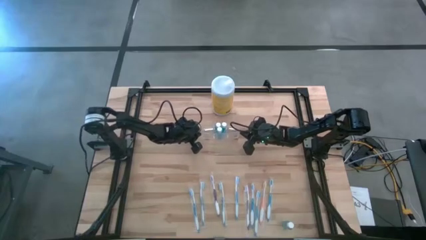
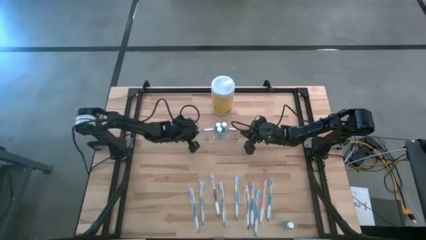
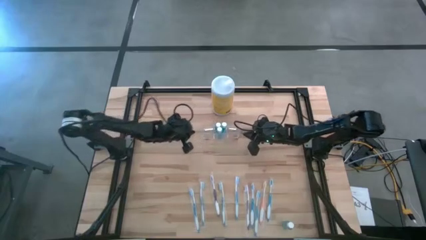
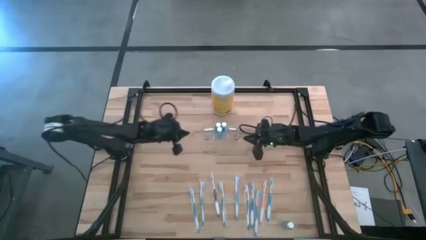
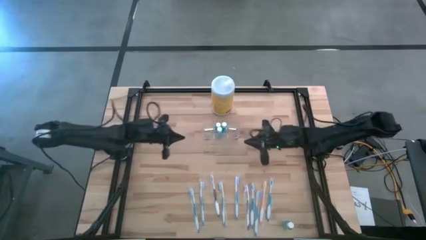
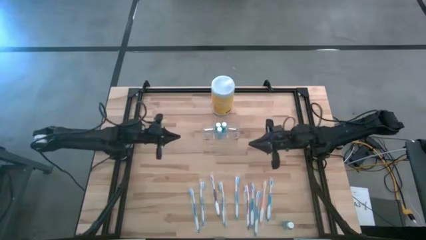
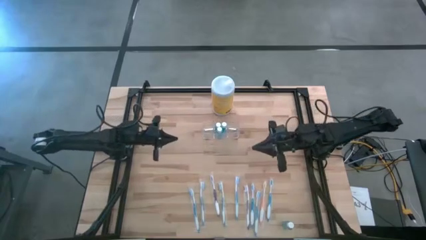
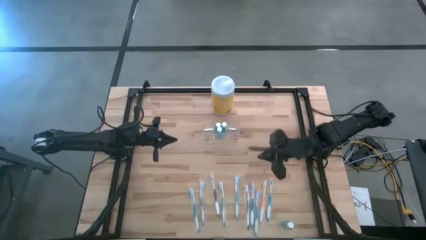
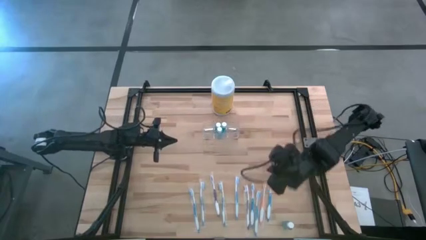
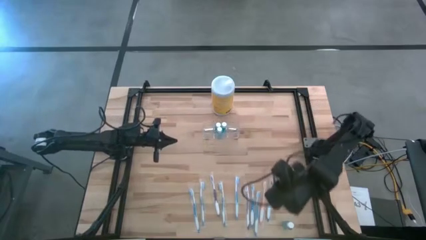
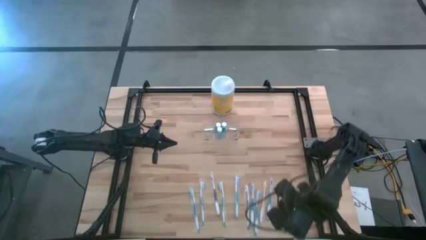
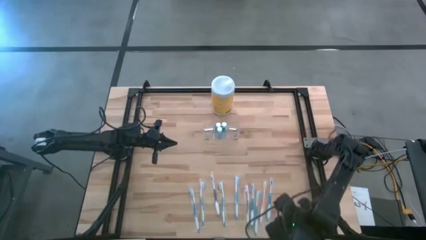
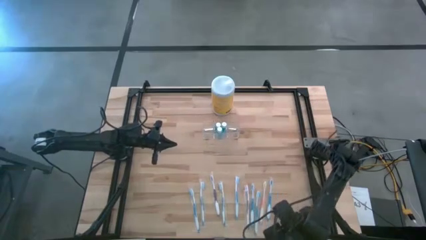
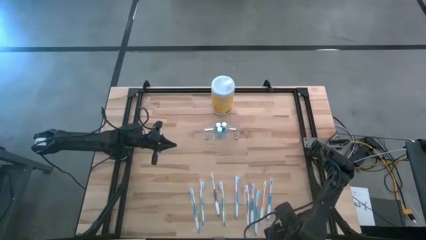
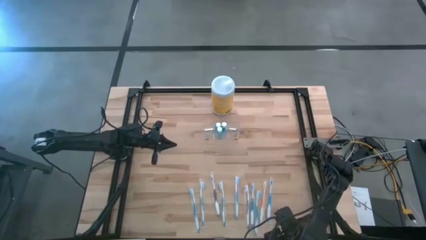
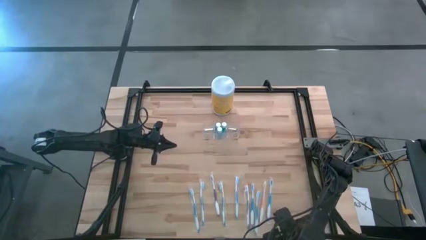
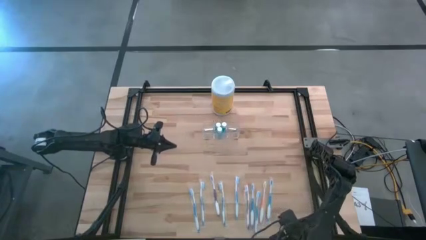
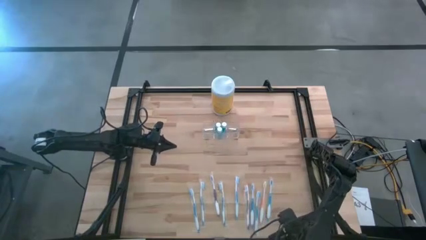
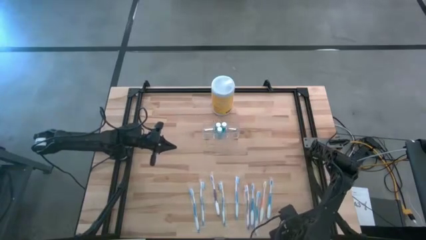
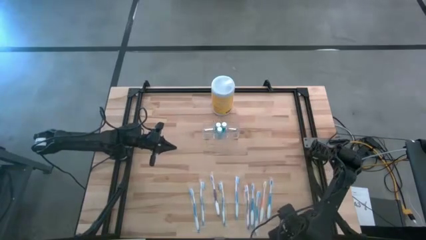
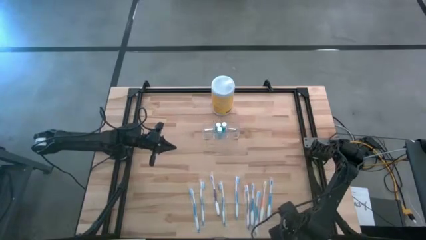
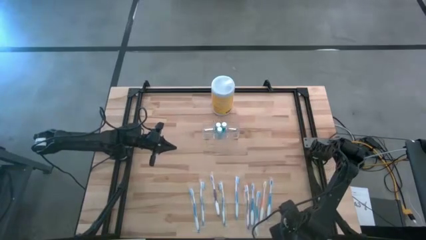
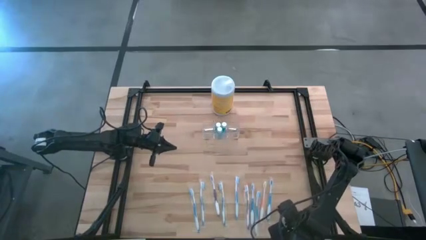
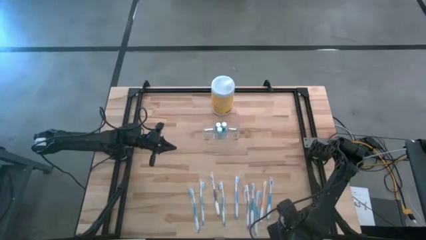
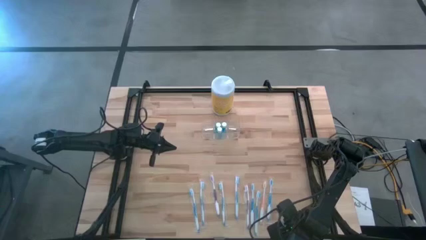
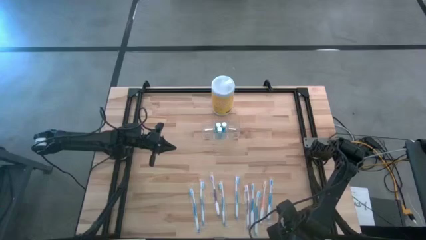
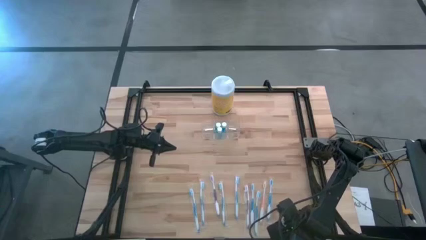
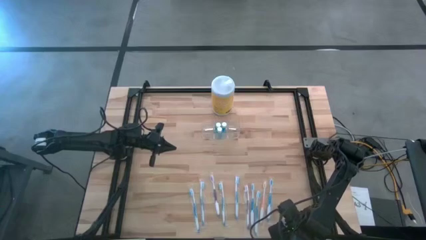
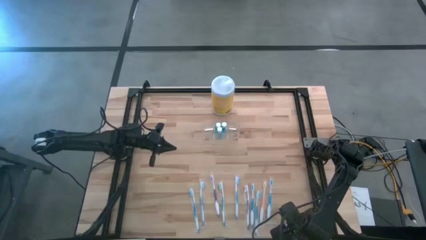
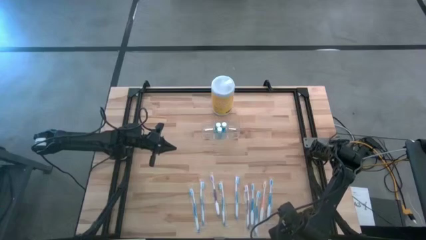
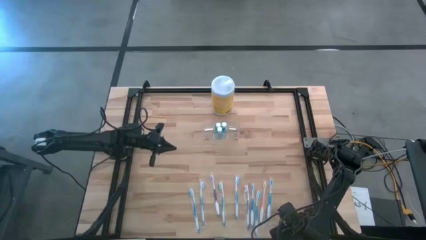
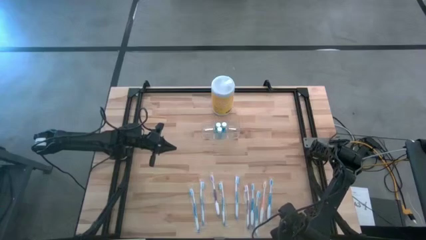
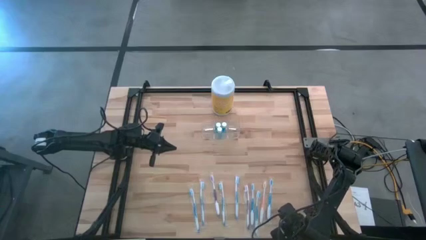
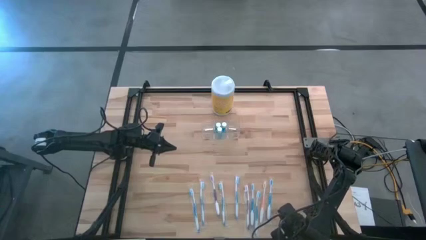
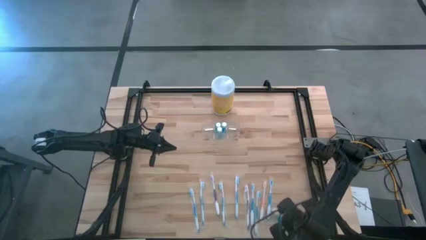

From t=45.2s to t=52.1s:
Task: Pick & Place toothbrushing station
Put the blue mouthwash into the transparent organizer

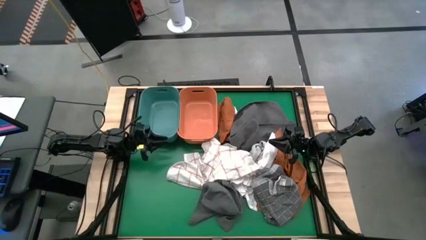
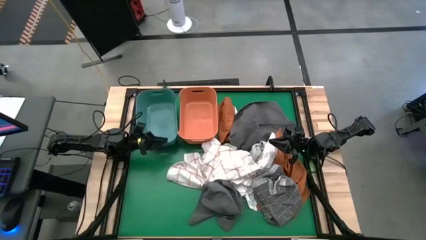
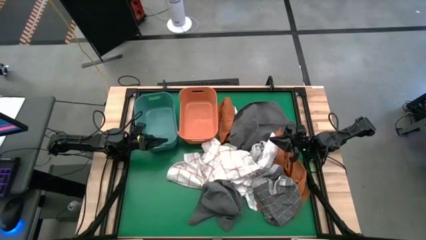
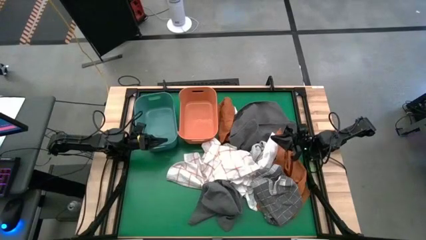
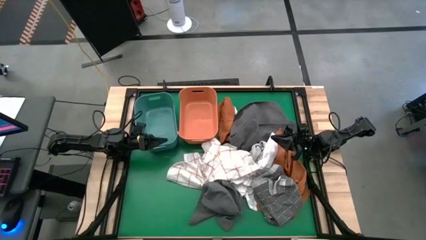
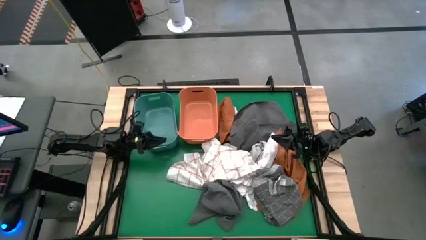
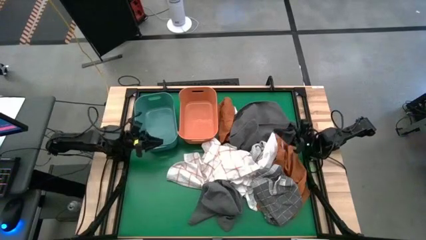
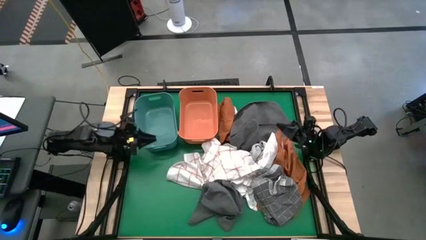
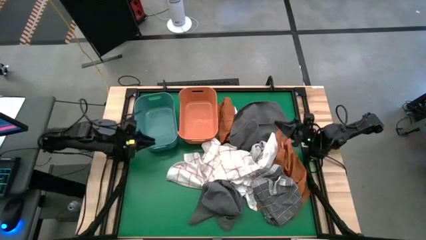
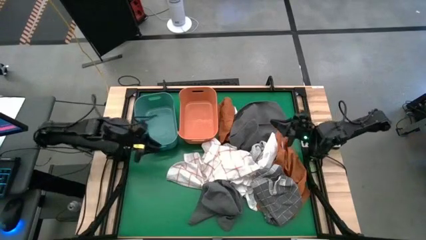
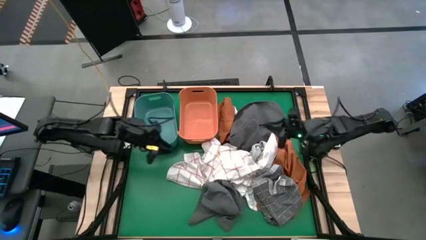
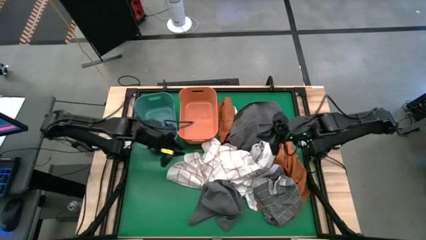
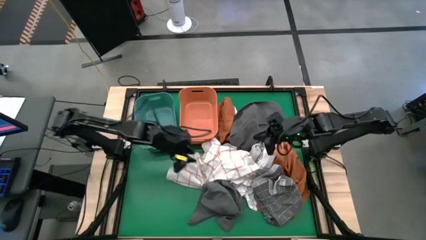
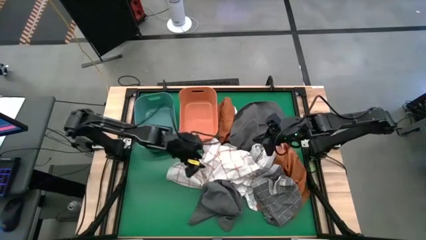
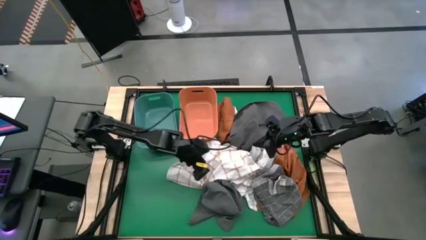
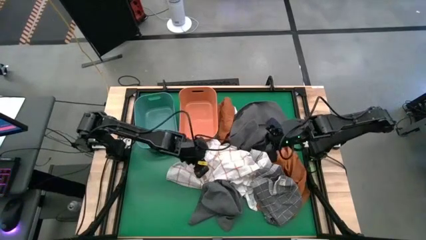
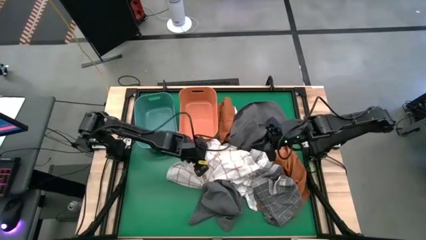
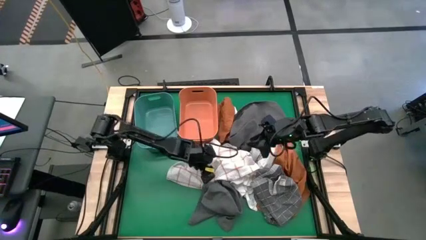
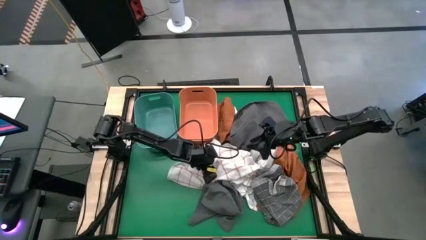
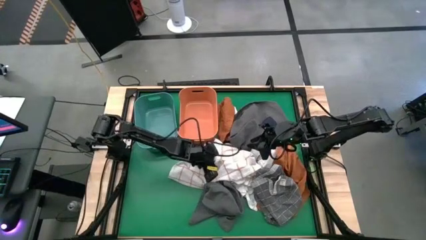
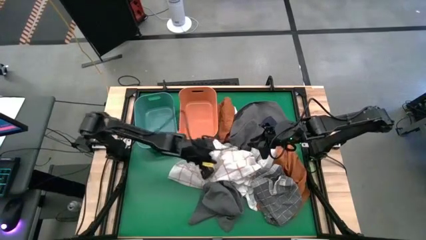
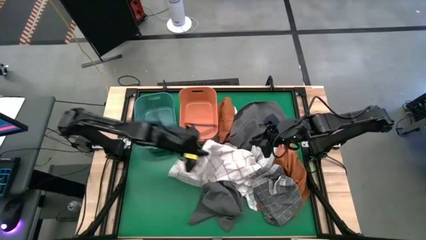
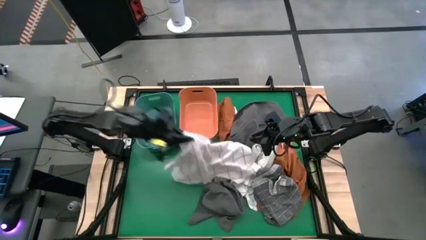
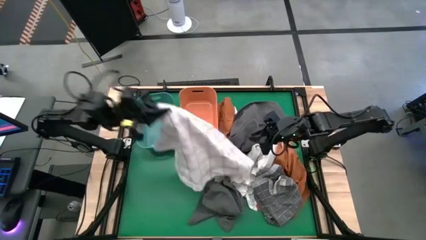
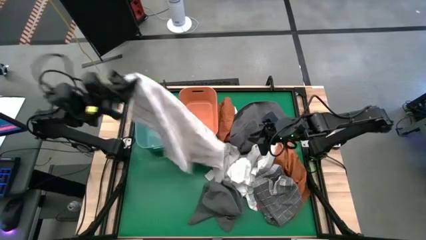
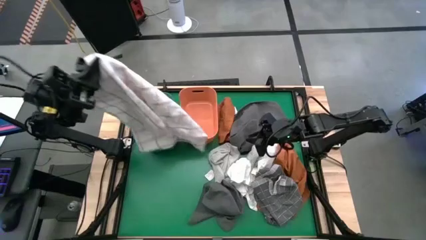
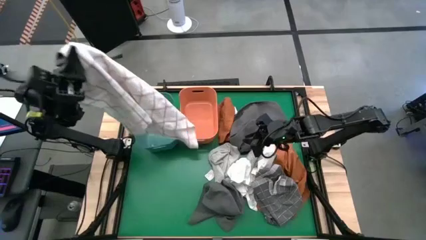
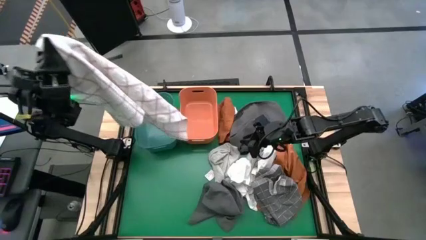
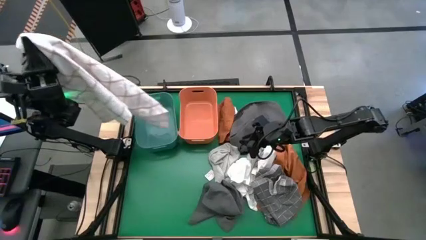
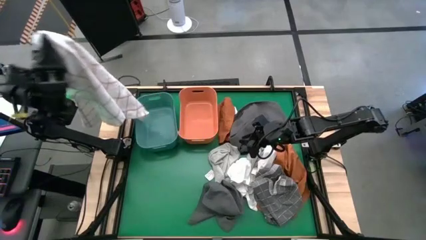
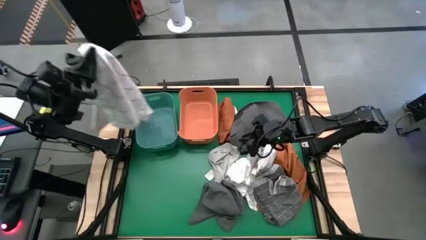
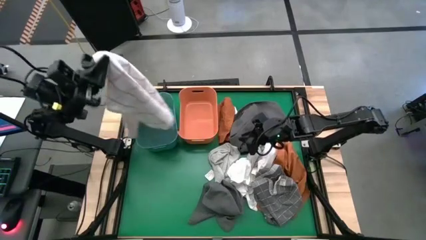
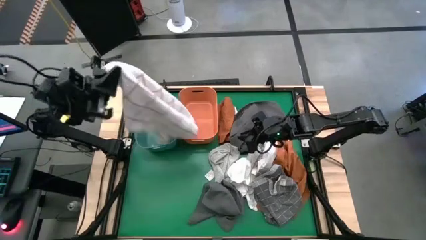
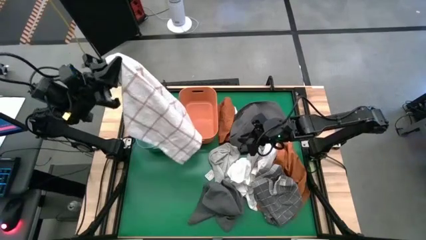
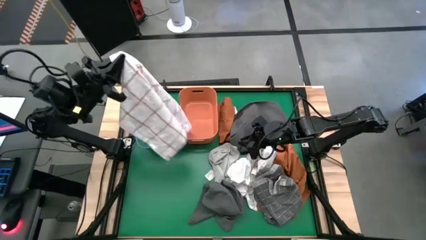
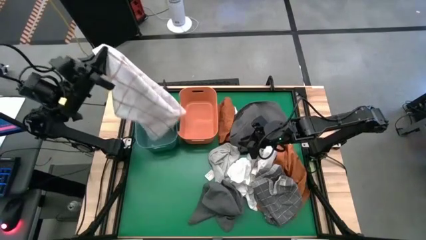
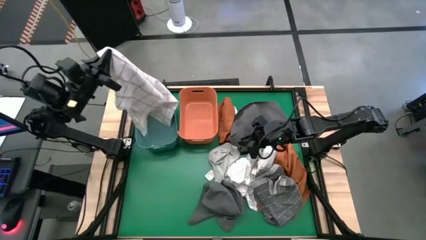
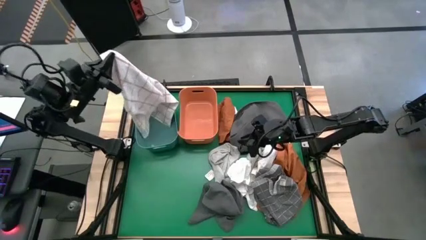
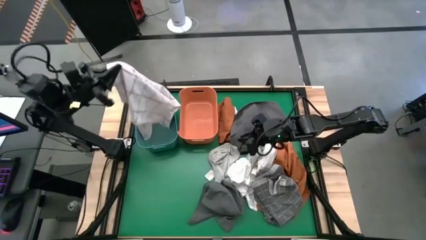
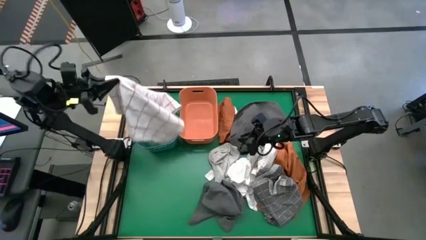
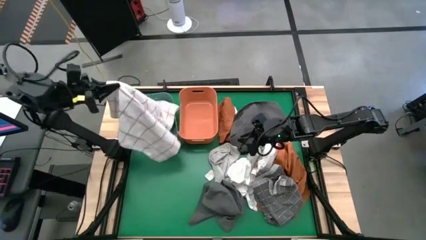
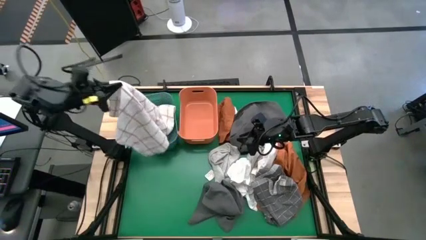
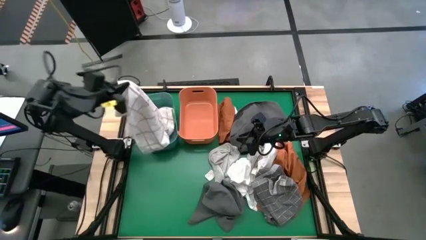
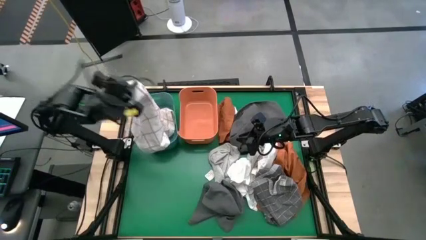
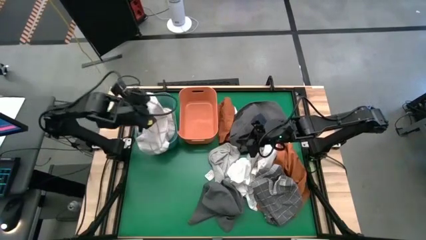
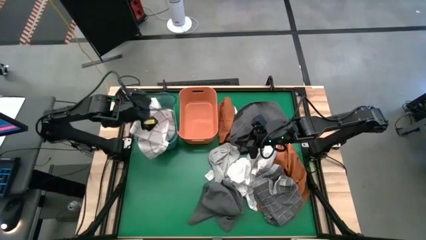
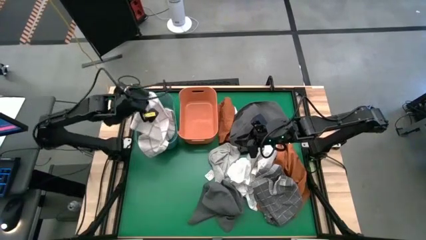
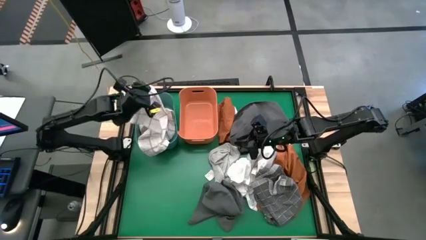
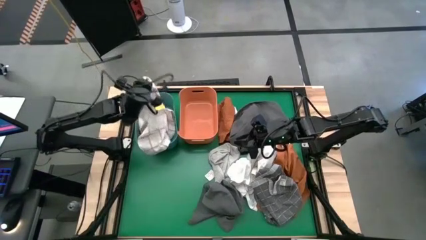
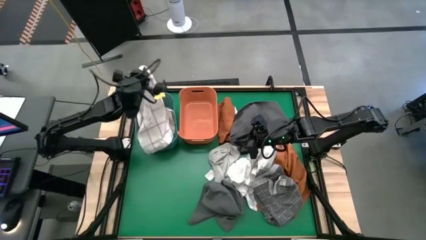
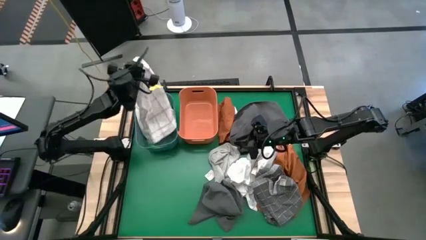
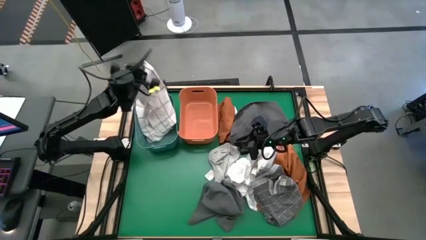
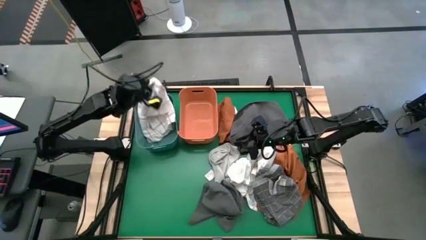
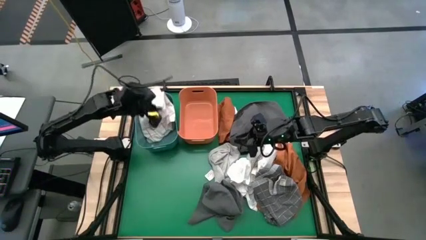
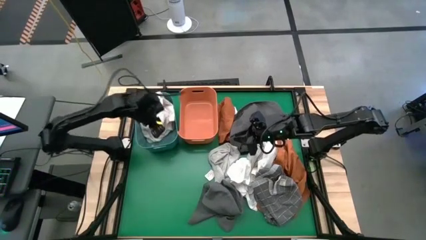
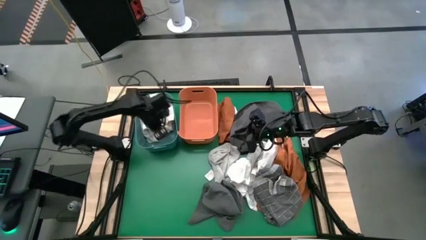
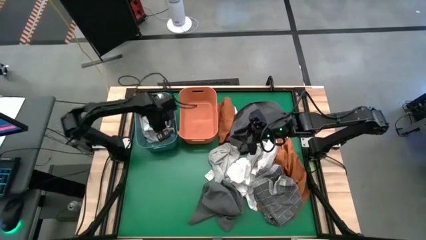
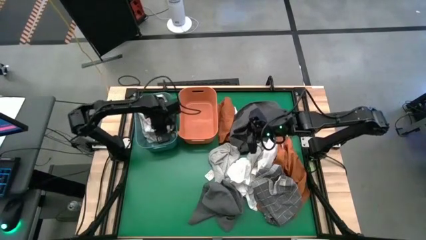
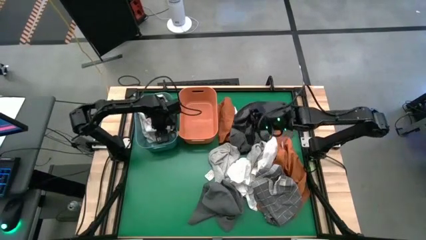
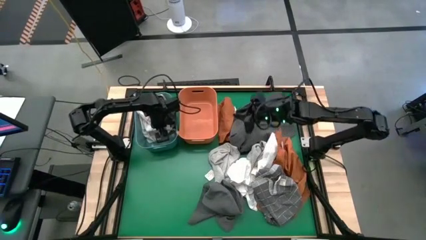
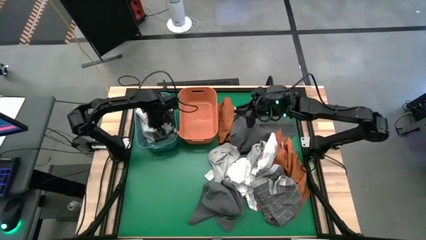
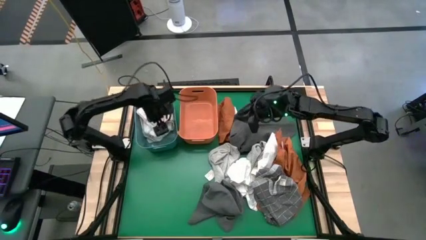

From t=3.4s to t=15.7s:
Task: Sort towels by color in basket
Put the white/brown towel into the blue bin
